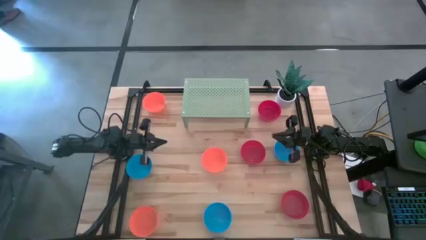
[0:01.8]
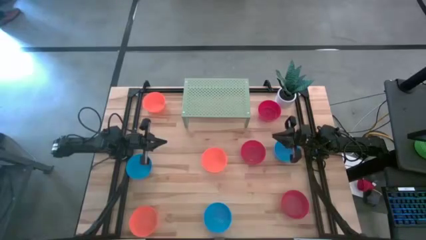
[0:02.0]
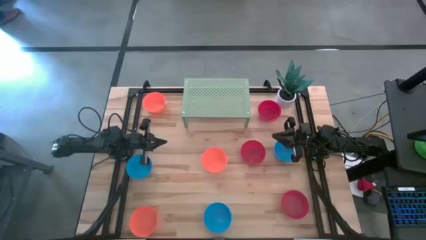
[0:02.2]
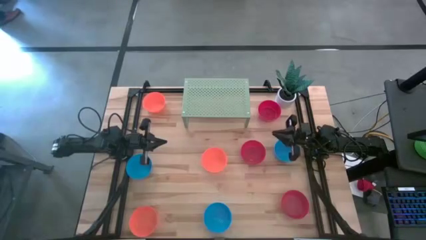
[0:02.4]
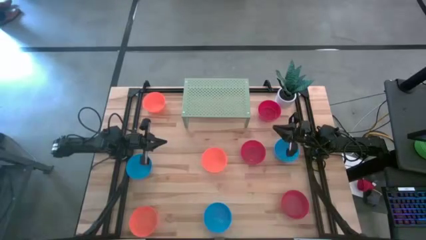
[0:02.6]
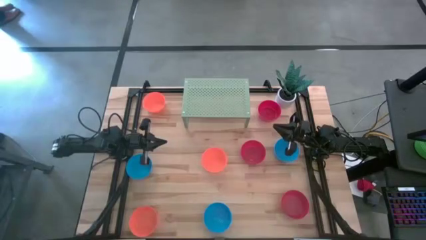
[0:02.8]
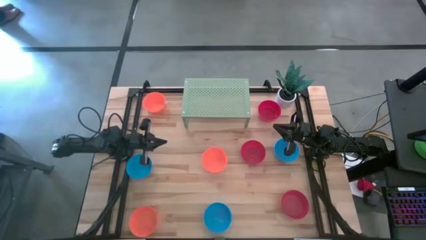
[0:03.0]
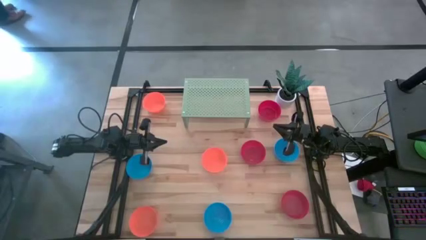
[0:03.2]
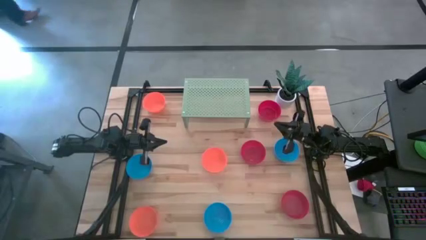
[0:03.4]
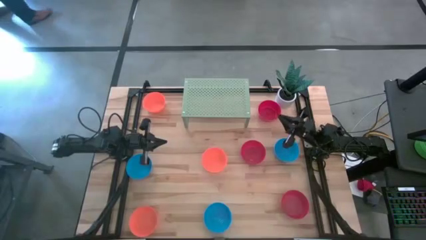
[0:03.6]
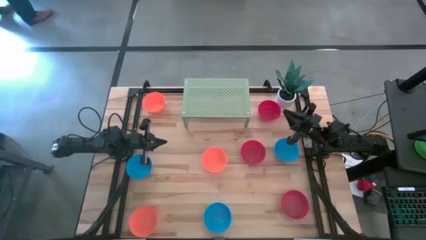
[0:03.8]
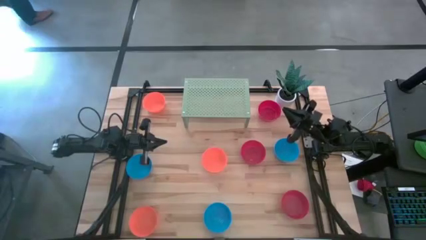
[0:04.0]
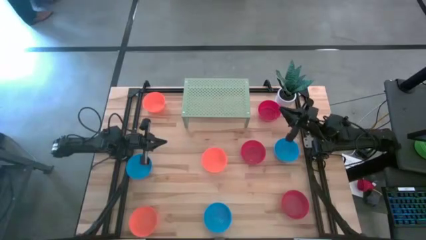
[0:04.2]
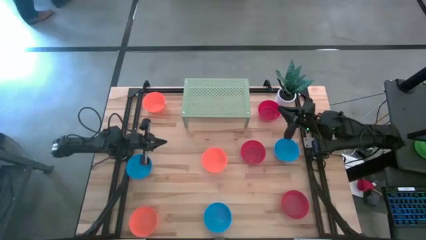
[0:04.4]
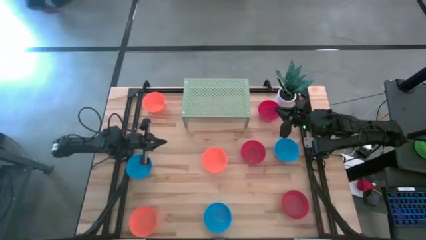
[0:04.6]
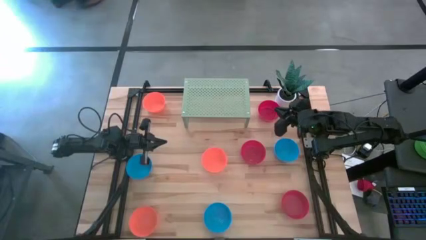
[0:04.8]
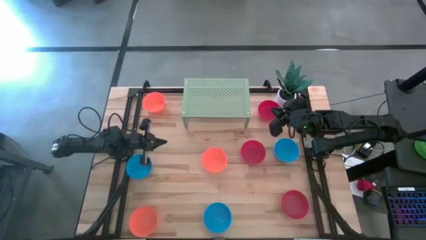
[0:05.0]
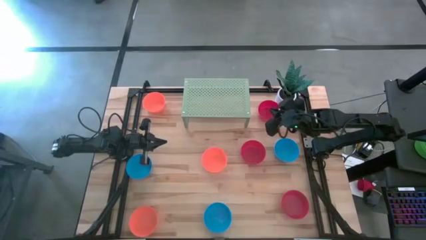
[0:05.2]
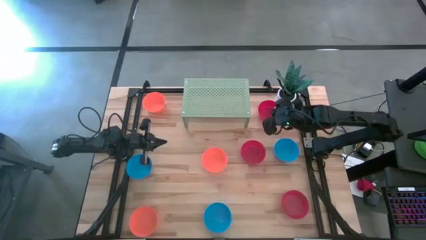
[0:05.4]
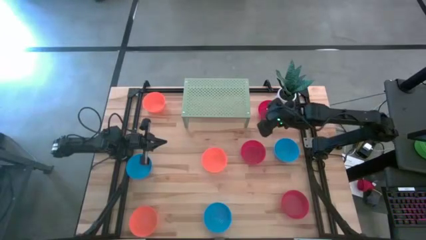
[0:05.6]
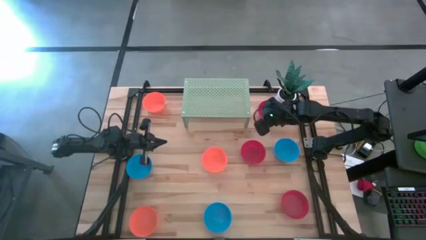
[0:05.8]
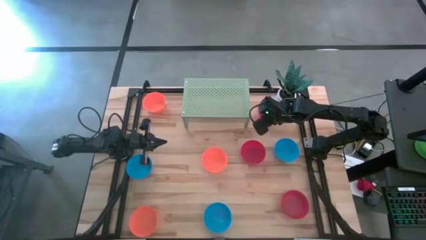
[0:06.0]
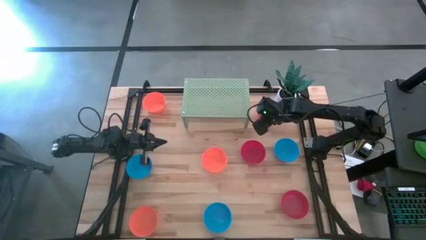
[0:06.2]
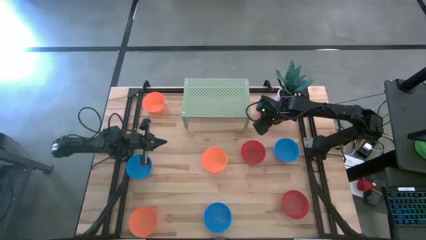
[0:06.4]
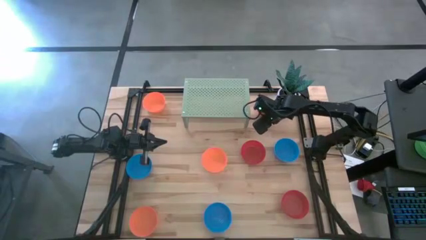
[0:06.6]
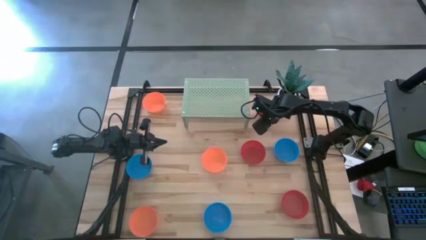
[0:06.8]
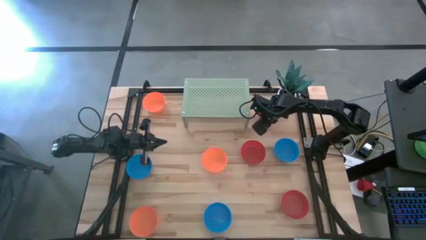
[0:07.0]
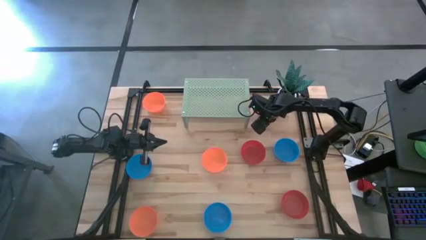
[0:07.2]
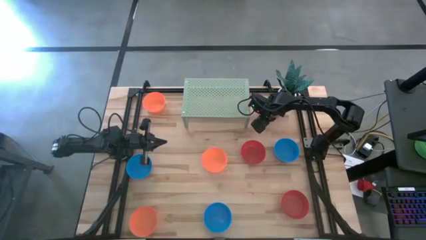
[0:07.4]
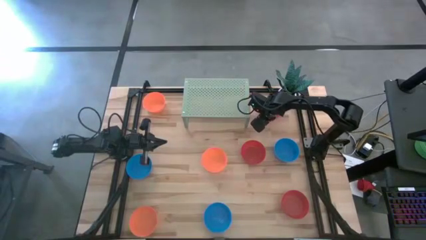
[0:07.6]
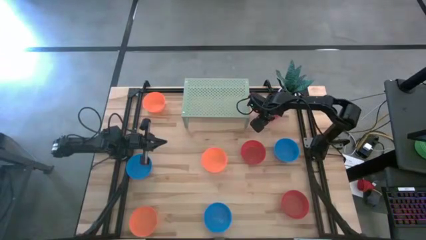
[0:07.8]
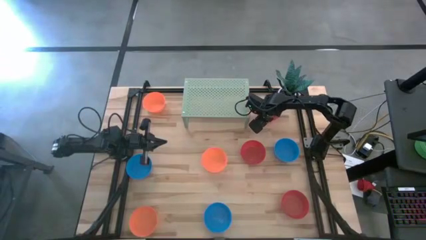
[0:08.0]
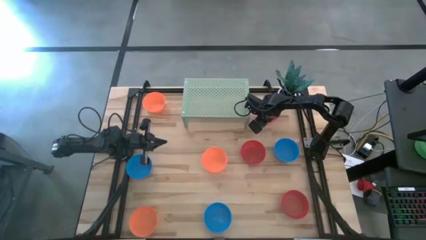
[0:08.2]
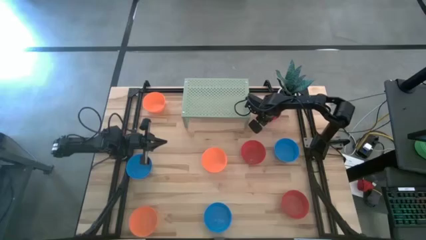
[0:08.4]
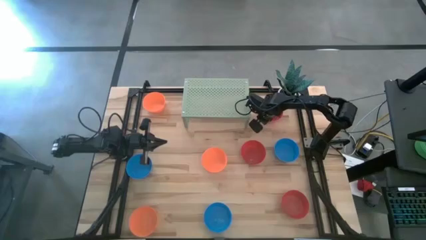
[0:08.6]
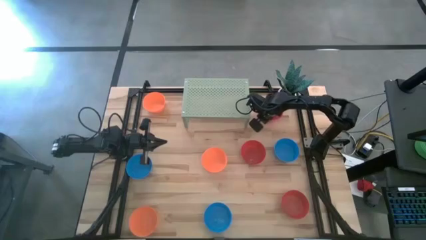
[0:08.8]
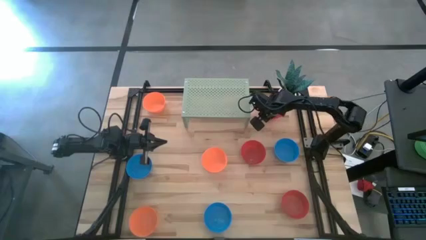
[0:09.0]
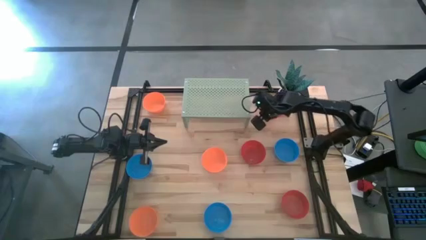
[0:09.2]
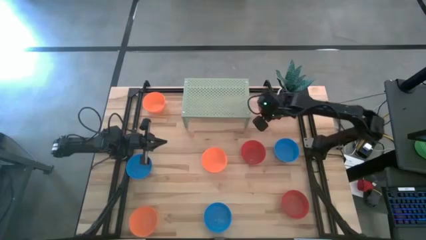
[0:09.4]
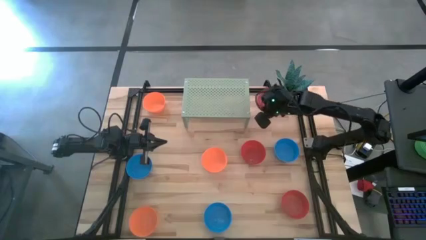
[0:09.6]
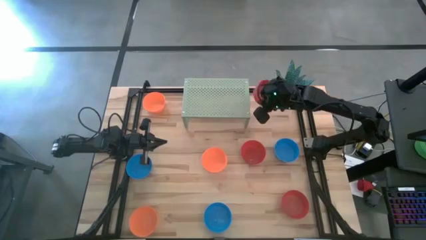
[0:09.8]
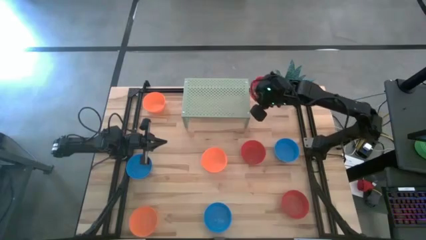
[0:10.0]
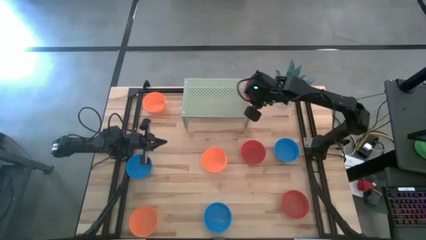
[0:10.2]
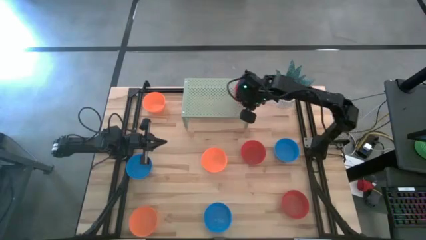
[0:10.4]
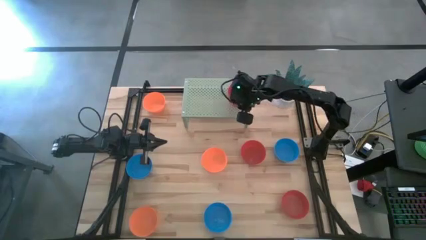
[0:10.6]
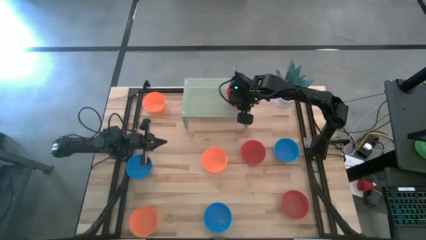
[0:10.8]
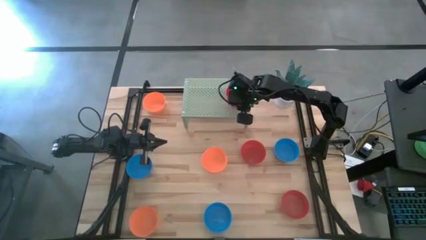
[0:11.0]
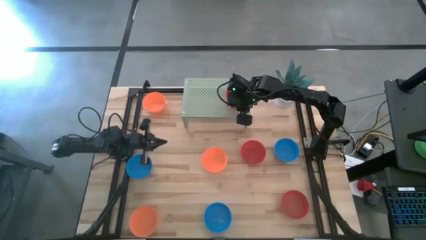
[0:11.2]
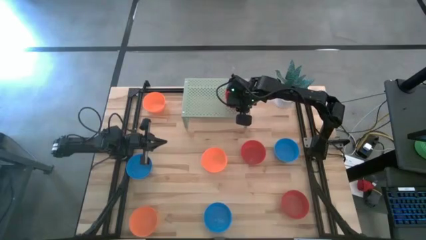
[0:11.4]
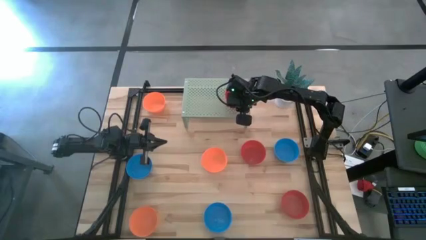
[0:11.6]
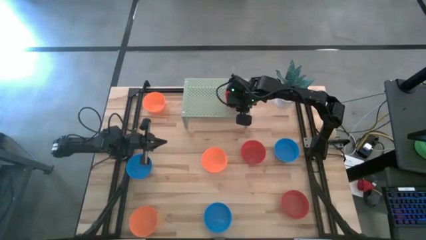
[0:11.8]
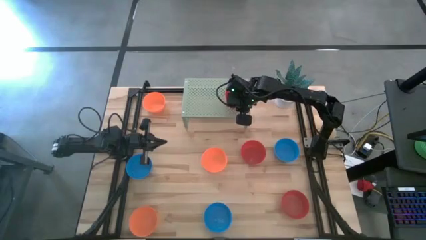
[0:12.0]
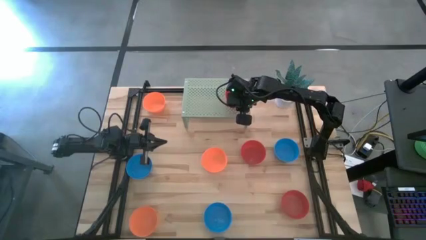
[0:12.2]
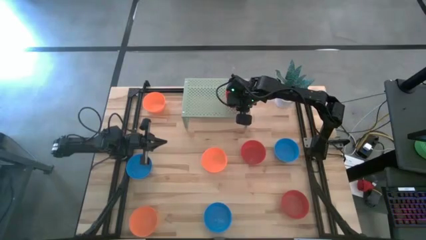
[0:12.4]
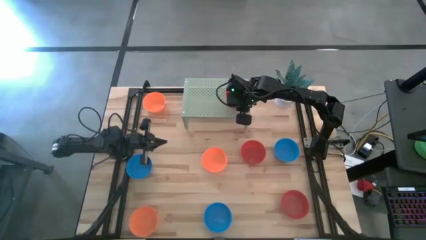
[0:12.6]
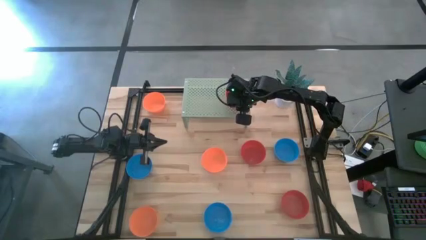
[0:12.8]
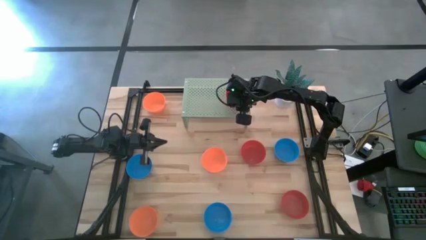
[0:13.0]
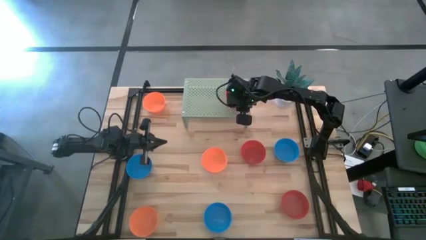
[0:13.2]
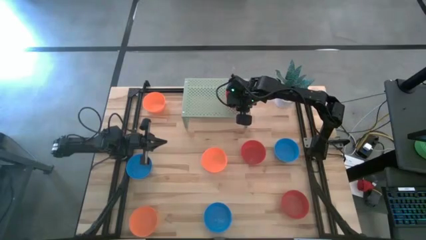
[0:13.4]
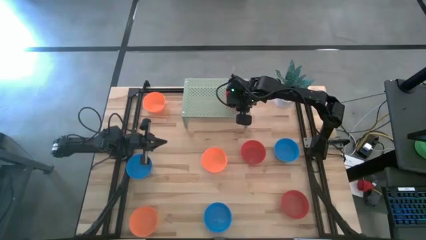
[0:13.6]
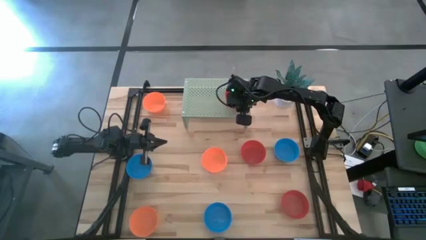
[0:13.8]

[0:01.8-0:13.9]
Task: Pick & Place Mini bowls
Put the top red bowl on the shelf

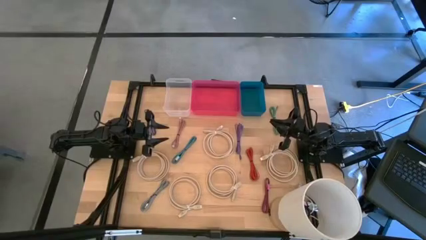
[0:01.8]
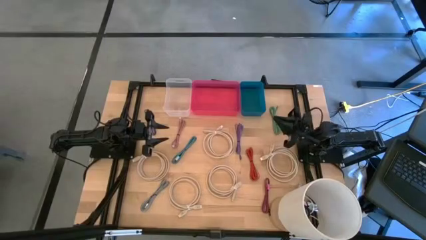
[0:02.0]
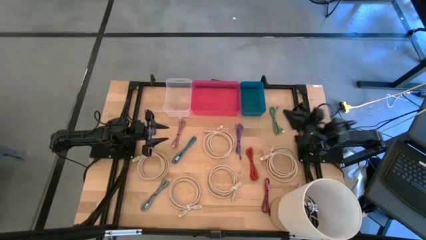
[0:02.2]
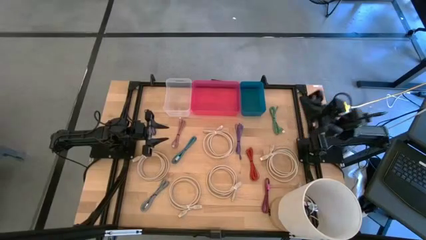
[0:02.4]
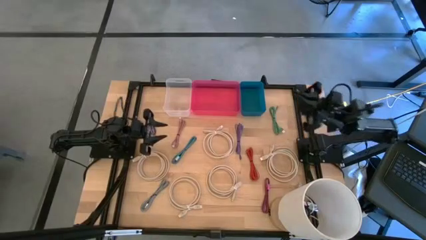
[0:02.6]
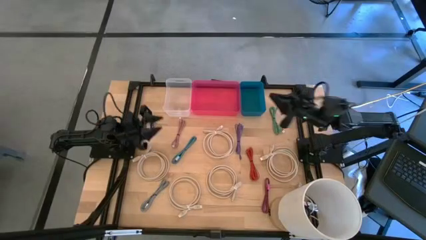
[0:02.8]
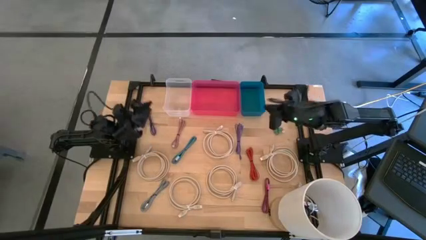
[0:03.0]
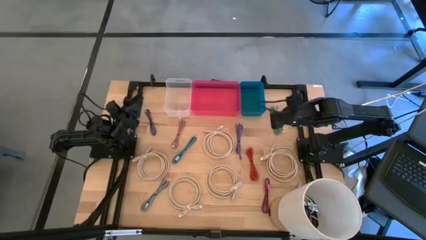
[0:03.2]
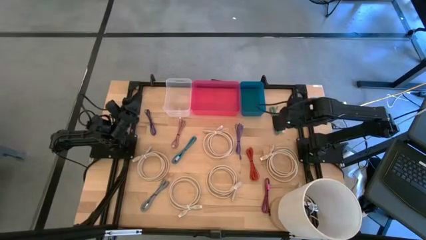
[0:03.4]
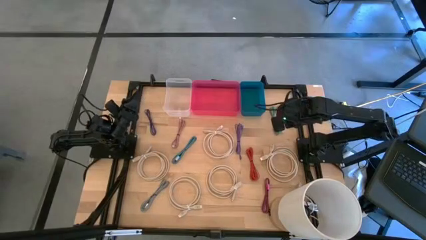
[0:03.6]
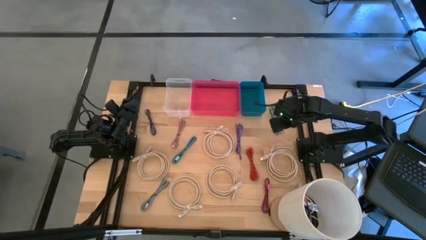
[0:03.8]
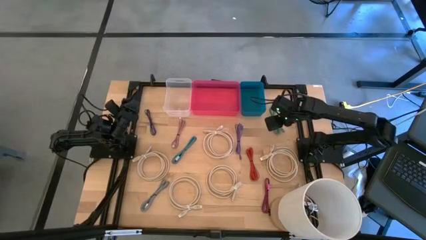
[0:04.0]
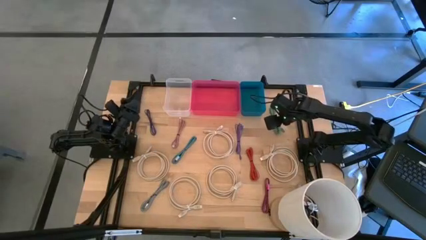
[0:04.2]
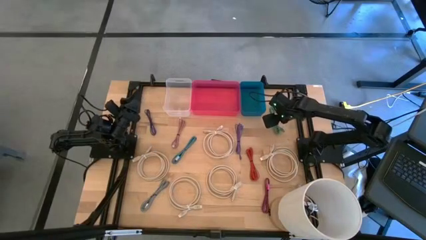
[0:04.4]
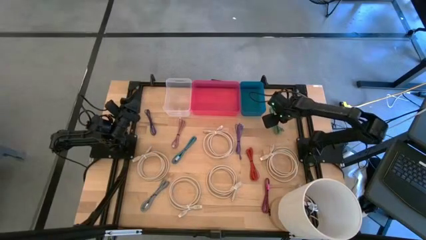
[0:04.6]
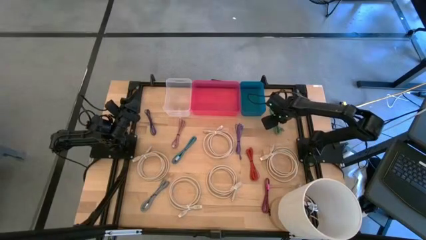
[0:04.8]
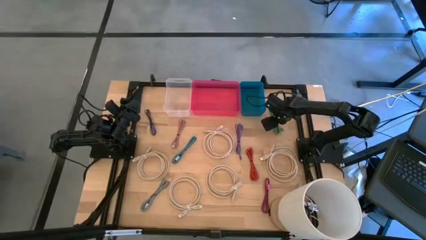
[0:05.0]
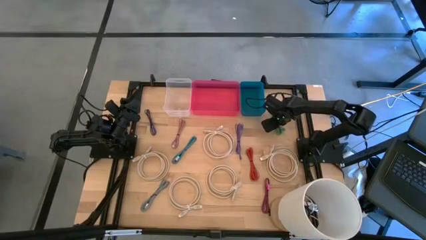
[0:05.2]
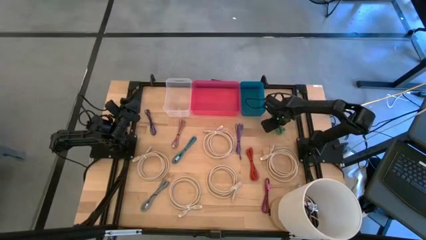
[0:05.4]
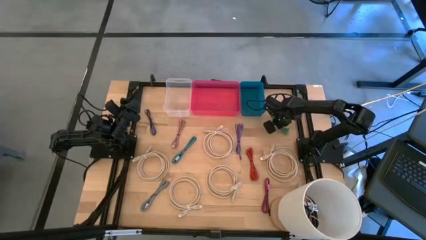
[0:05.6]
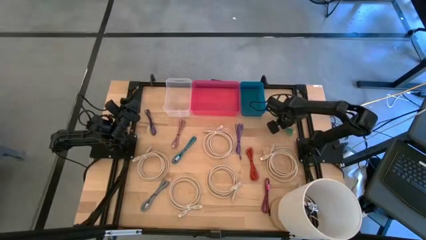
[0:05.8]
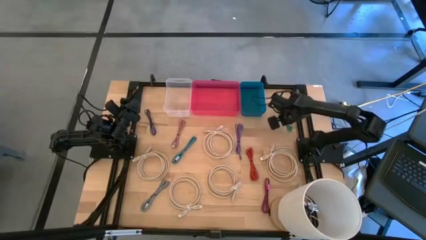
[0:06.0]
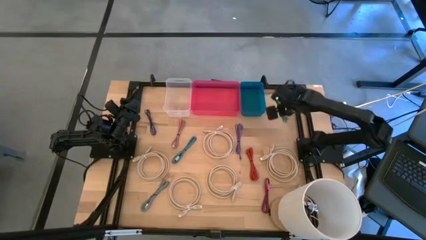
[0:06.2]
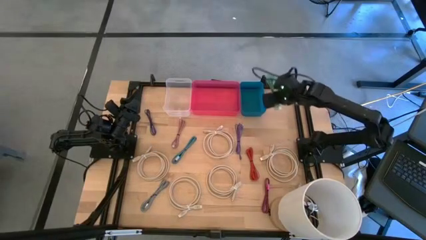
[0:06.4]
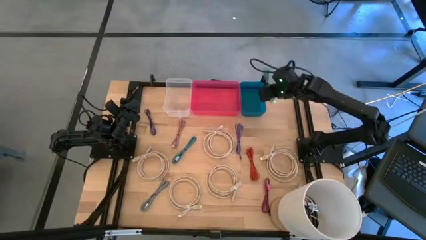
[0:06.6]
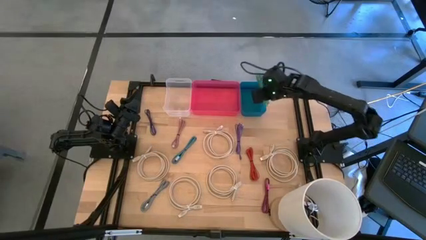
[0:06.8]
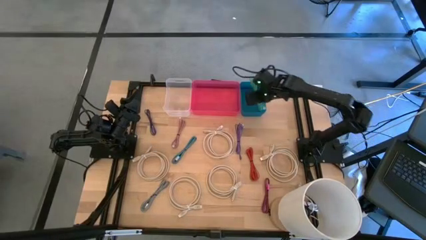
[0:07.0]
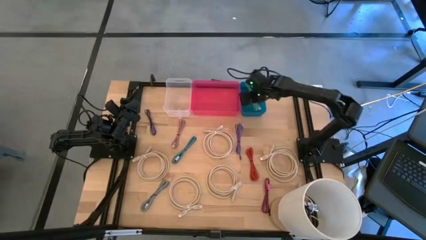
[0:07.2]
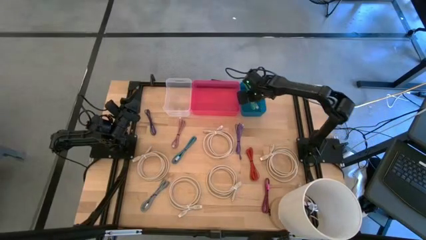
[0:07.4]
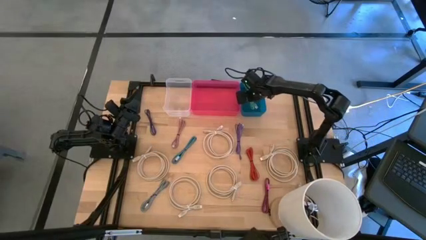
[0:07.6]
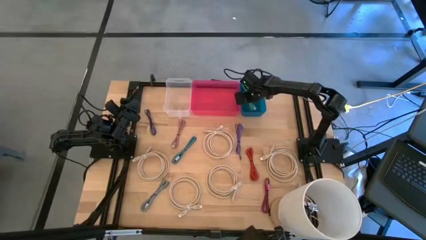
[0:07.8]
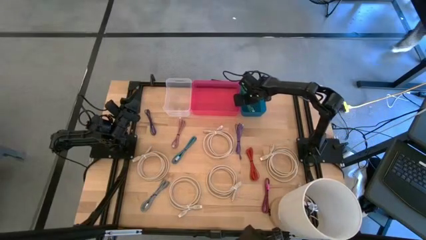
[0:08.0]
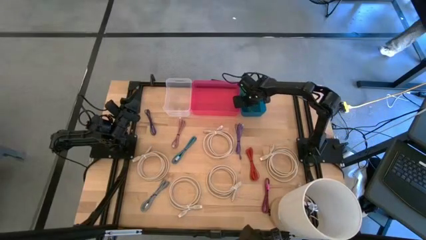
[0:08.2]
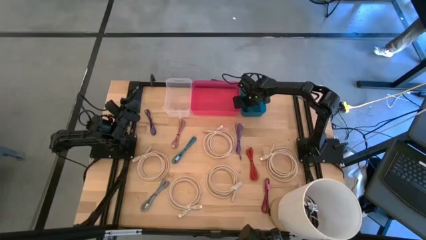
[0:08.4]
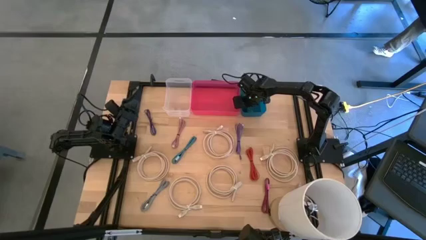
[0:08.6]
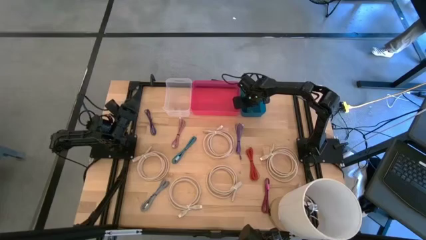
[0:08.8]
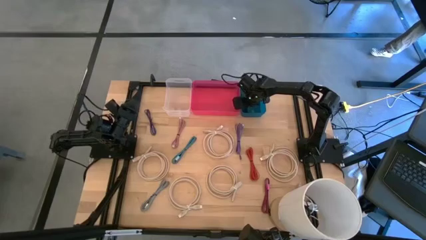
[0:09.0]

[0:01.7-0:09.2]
Task: Pick & Place USB Port
Put the green charger cable into the blue bin
